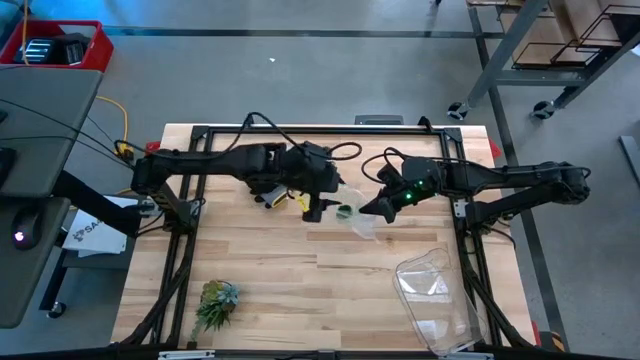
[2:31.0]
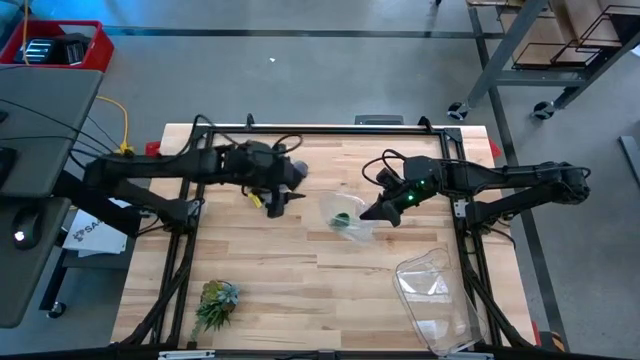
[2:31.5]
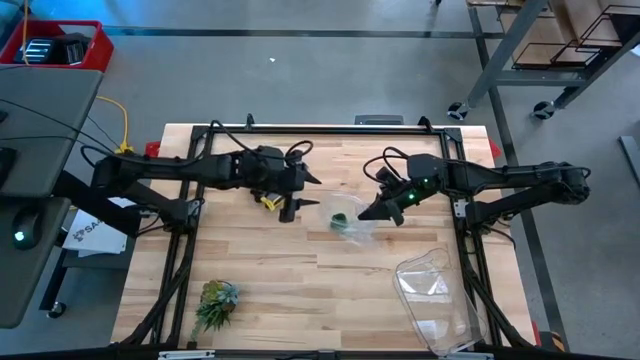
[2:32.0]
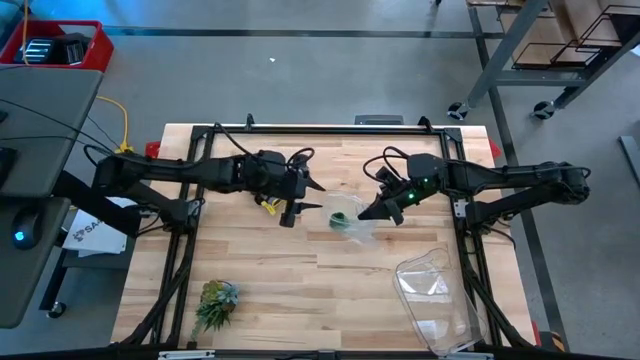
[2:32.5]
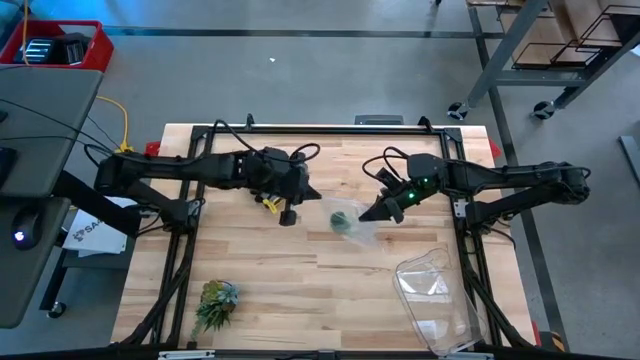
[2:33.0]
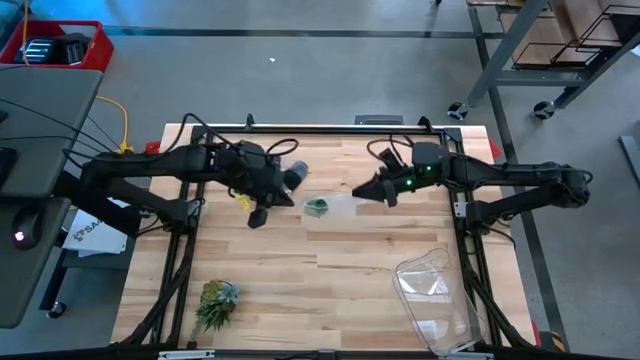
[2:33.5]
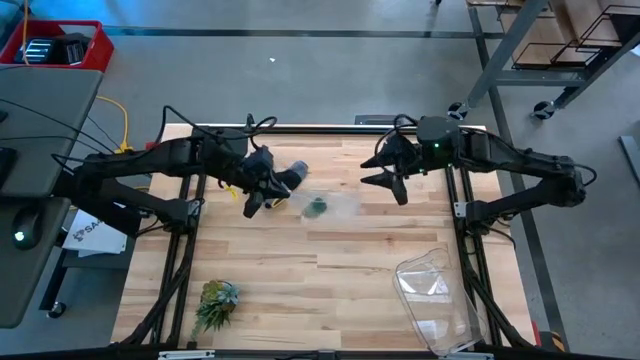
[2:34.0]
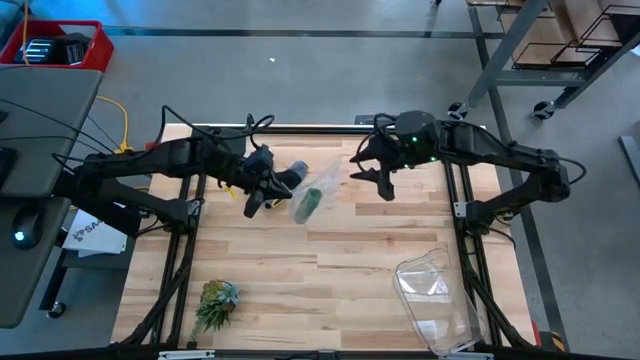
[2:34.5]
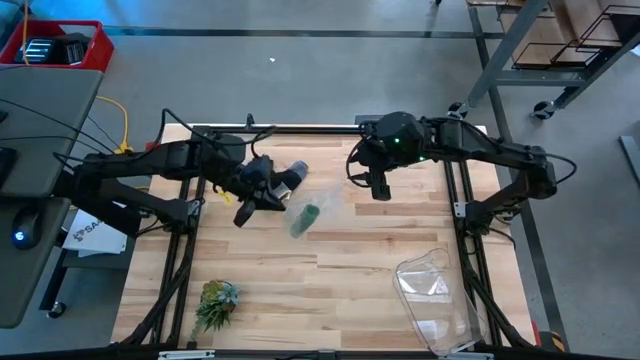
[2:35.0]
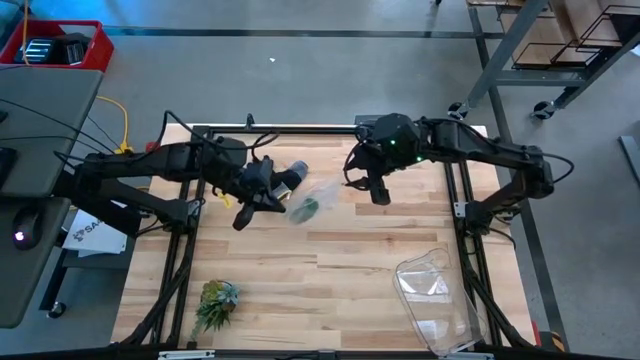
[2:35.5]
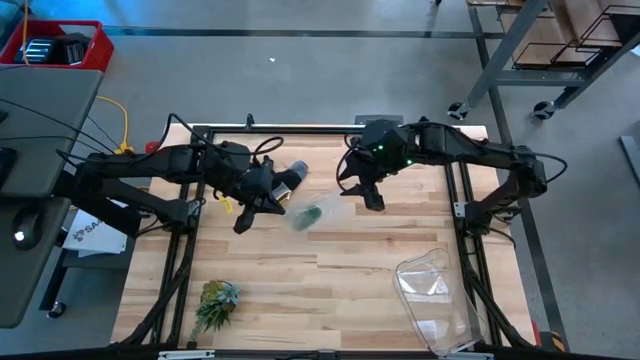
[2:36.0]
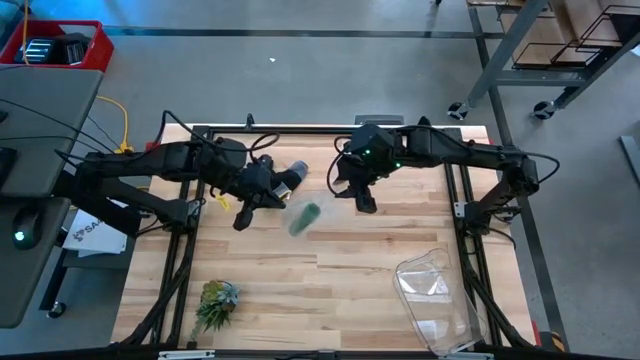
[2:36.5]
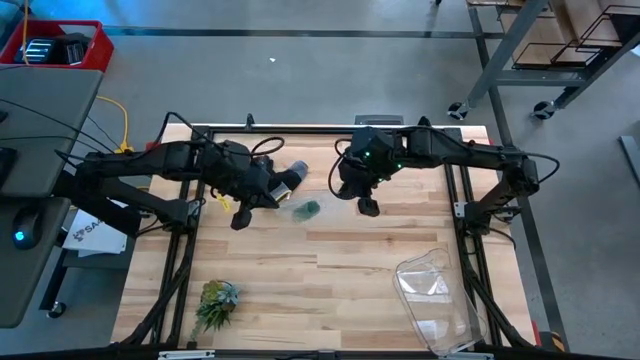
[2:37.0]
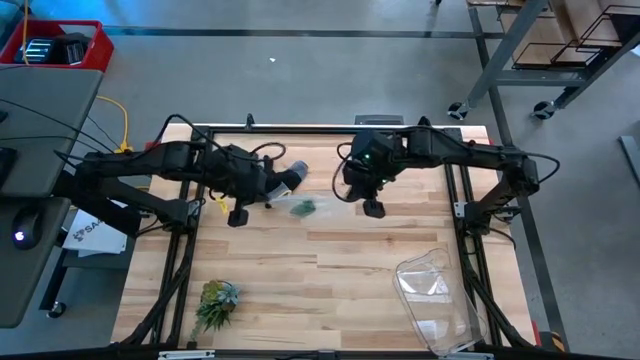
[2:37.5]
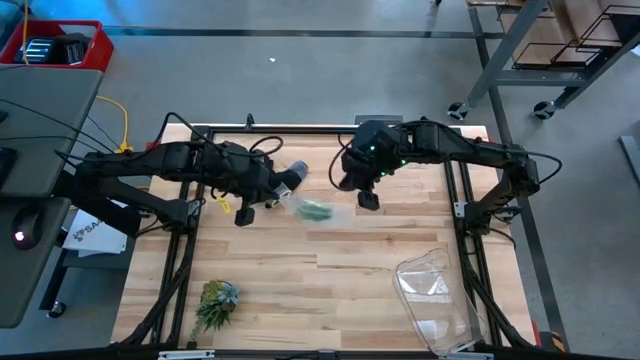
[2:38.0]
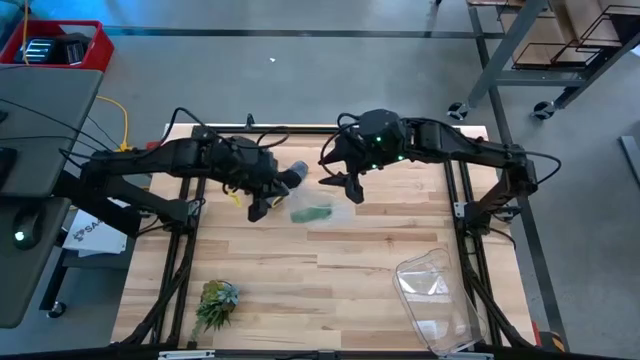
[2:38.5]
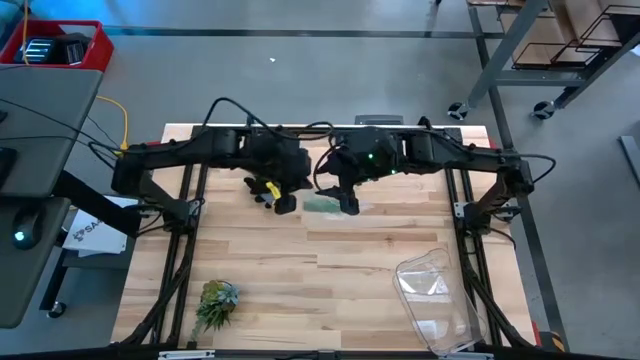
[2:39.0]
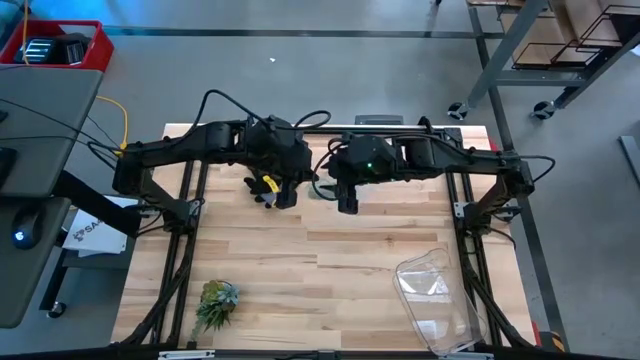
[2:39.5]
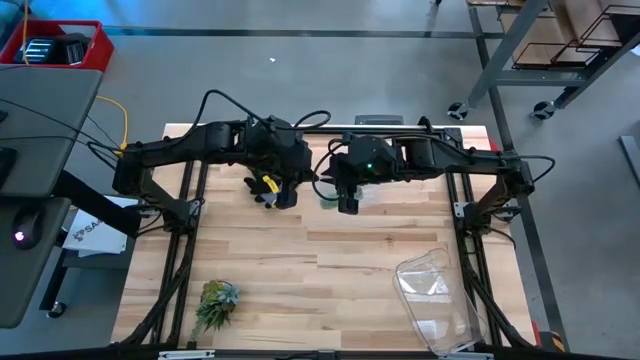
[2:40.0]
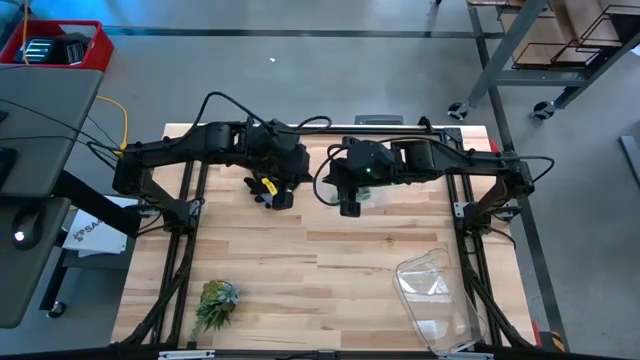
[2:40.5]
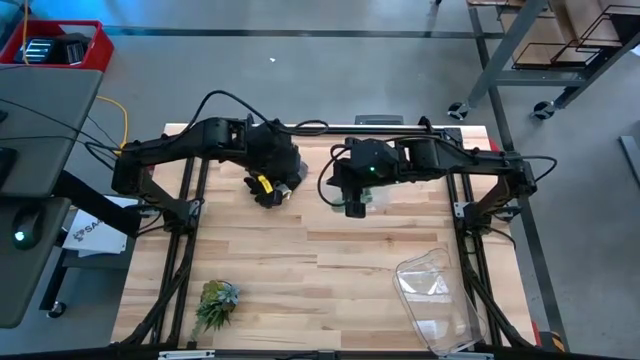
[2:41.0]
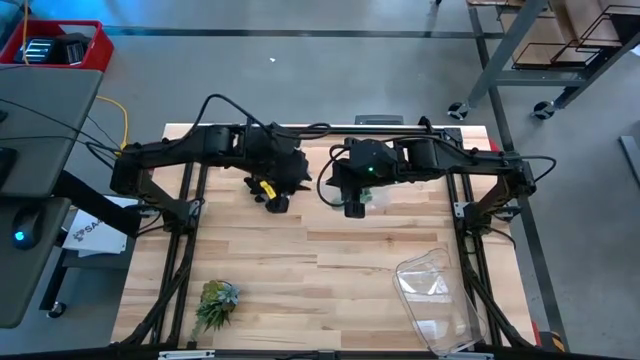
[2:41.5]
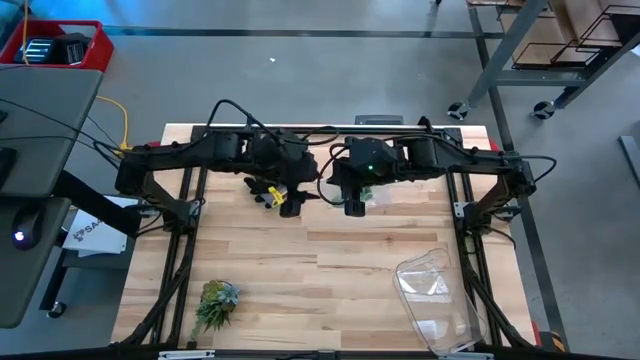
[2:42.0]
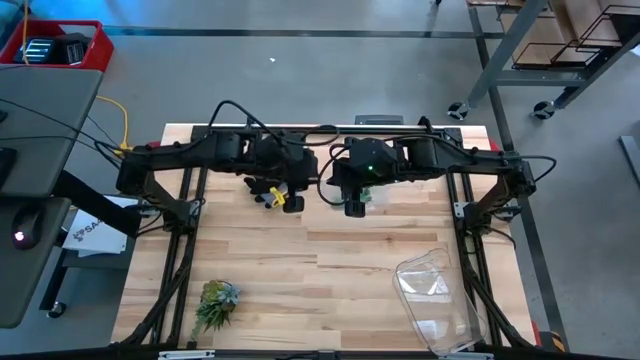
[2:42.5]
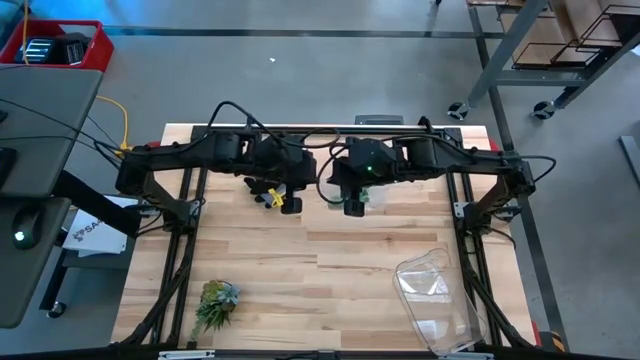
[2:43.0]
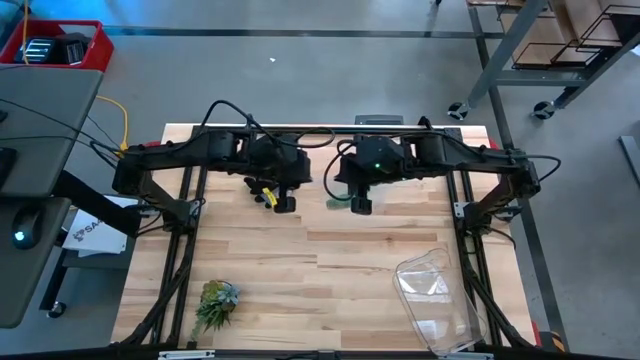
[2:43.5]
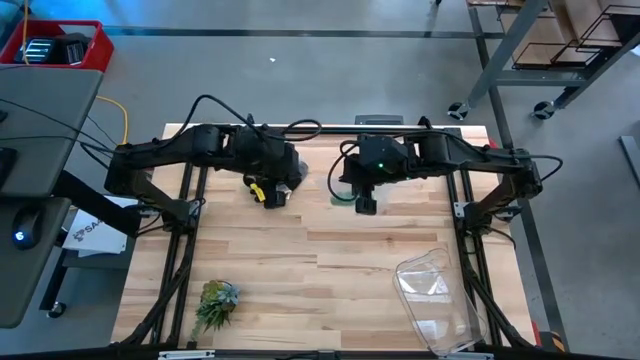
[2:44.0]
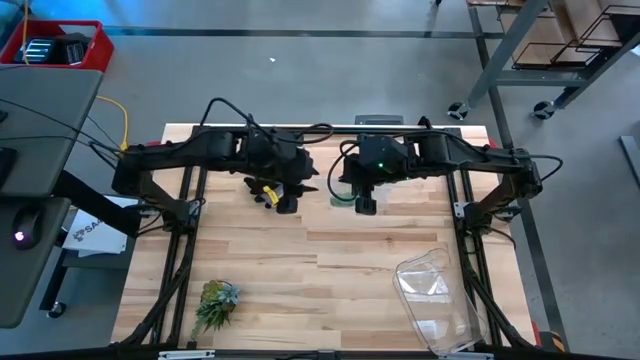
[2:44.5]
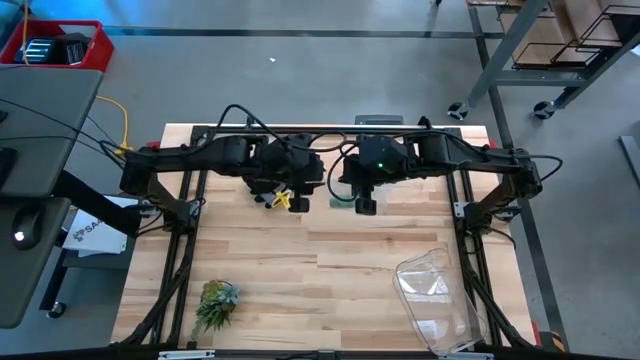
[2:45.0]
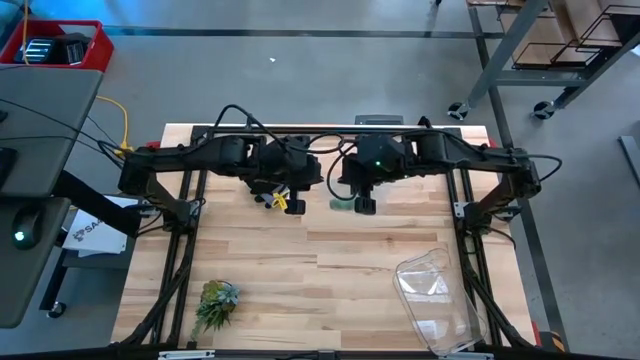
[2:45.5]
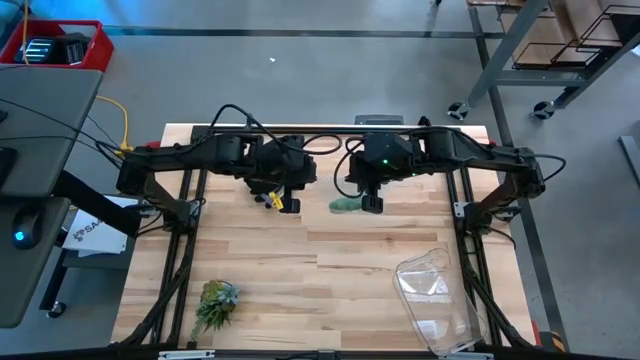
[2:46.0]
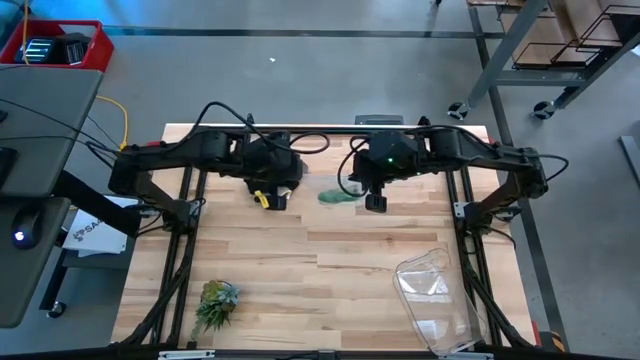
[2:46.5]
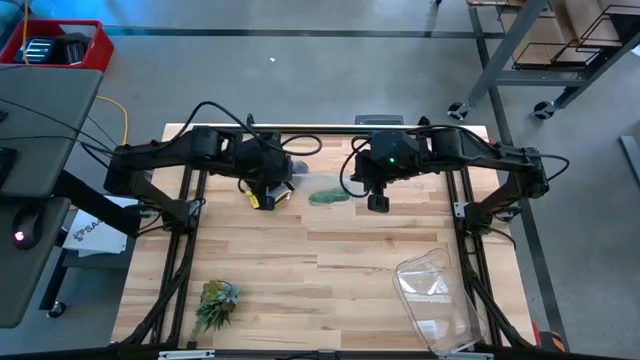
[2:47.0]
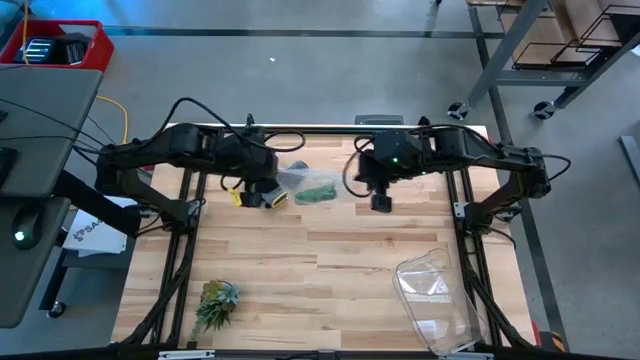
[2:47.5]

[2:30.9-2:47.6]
Task: Roll bandage
Close the transparent zip bag

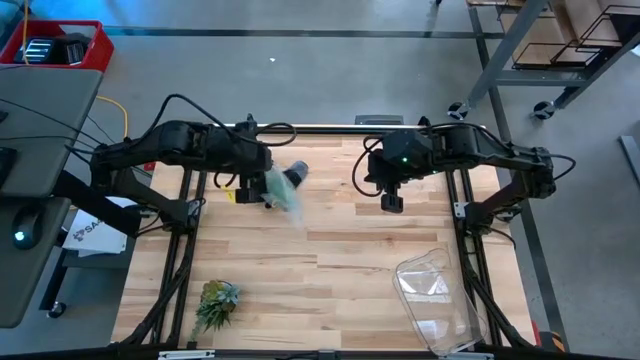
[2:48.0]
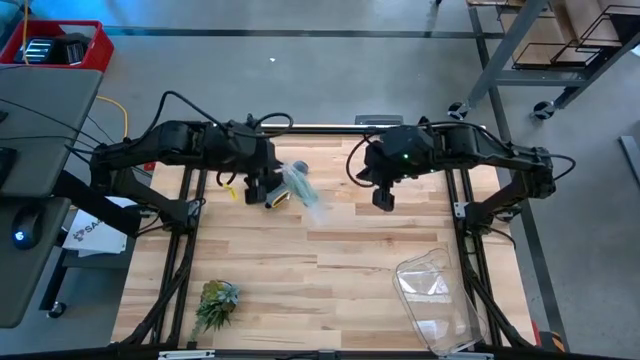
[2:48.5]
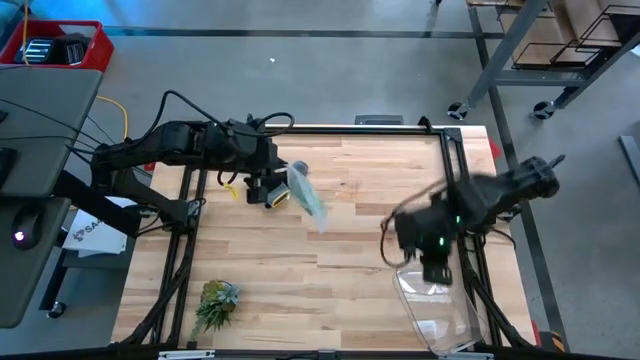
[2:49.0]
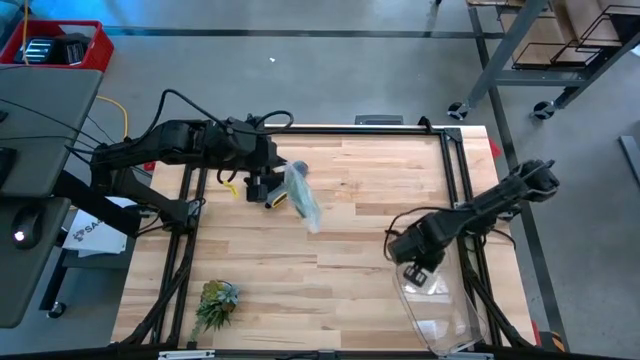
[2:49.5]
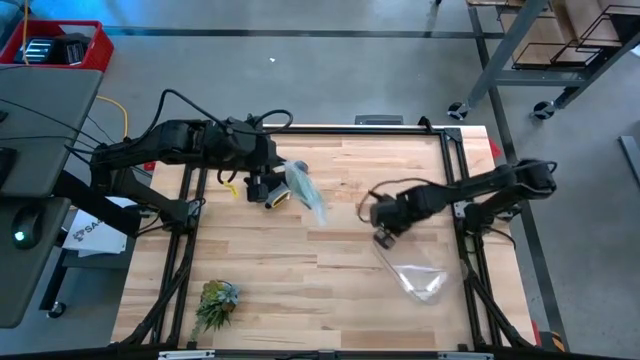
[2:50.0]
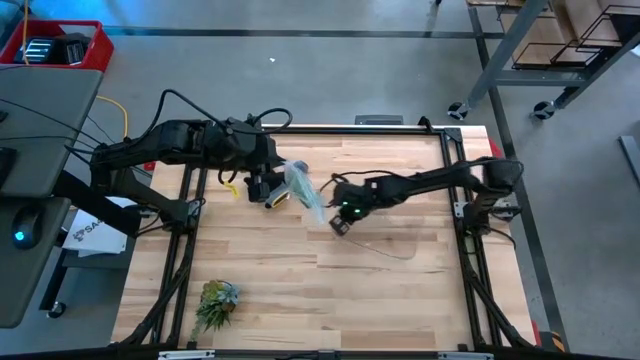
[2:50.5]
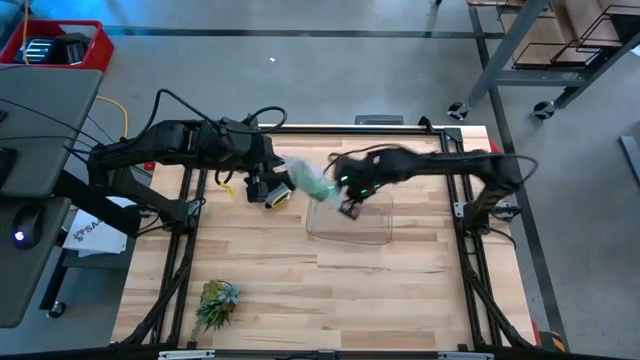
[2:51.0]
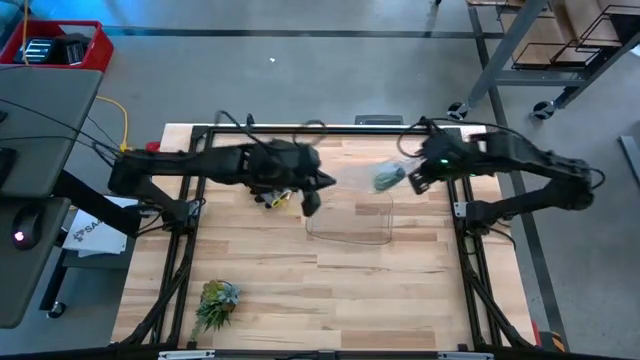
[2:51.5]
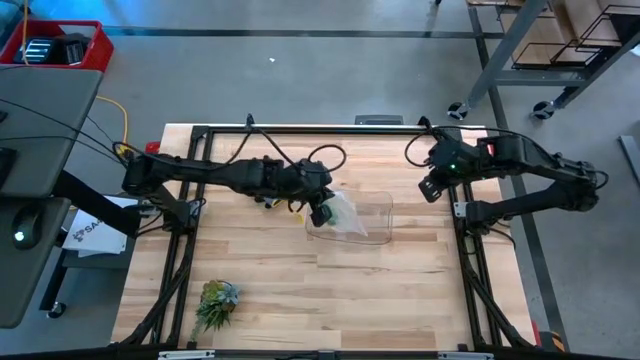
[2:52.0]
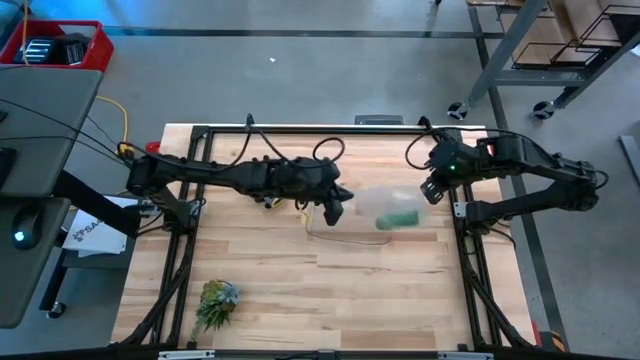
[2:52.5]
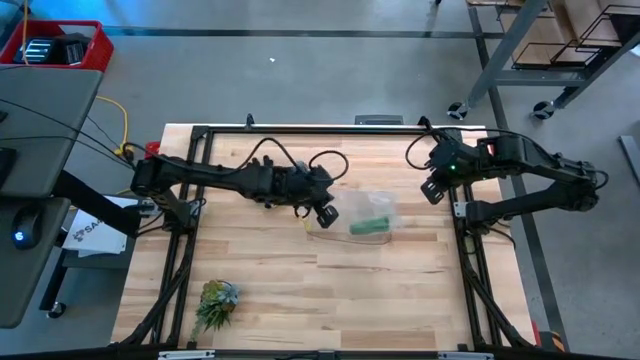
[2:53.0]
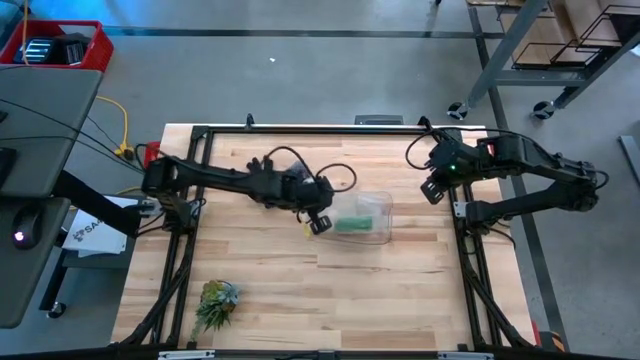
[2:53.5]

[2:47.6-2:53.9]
Put the transparent zip bag into the transparent bin
